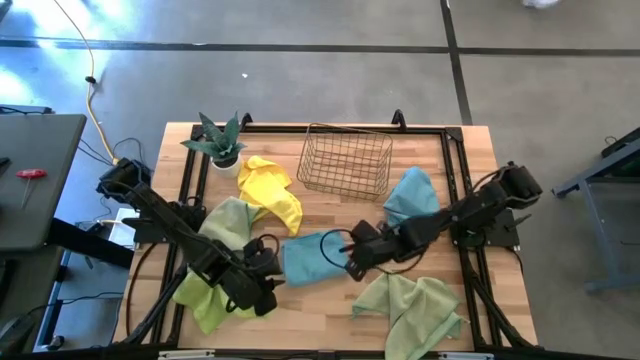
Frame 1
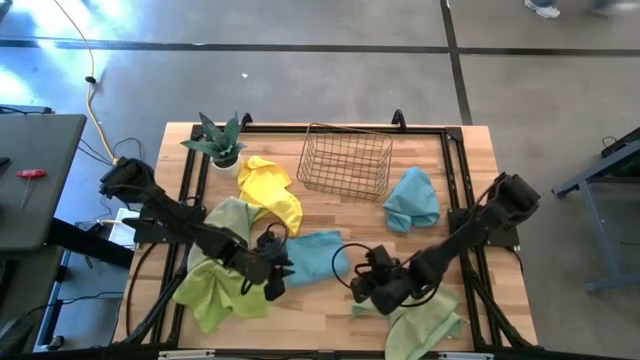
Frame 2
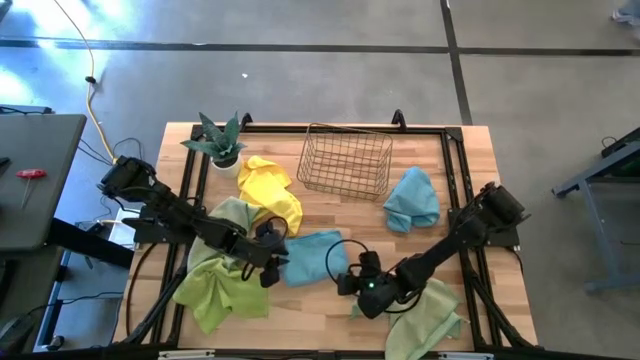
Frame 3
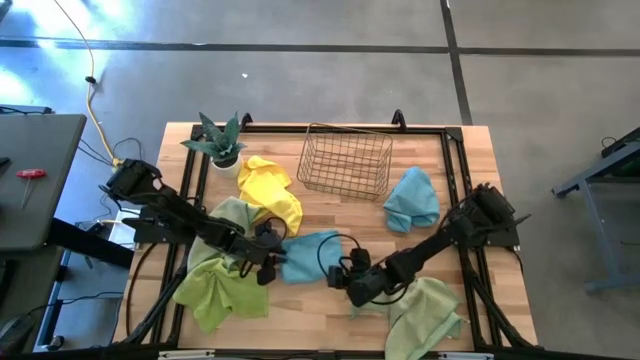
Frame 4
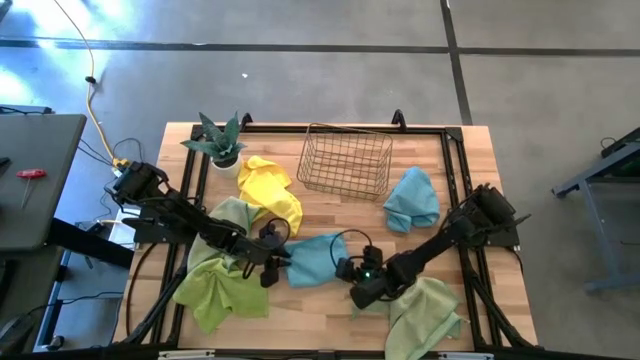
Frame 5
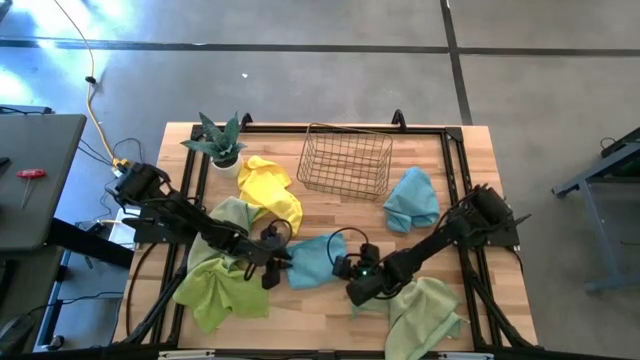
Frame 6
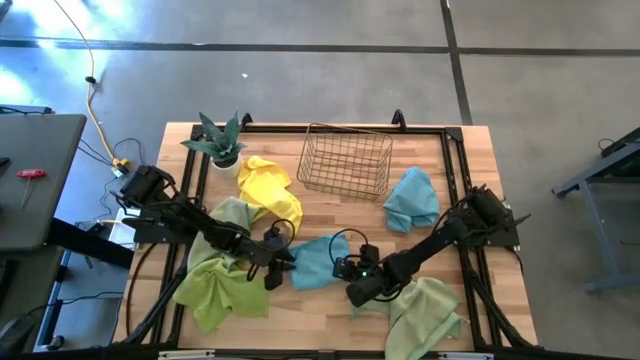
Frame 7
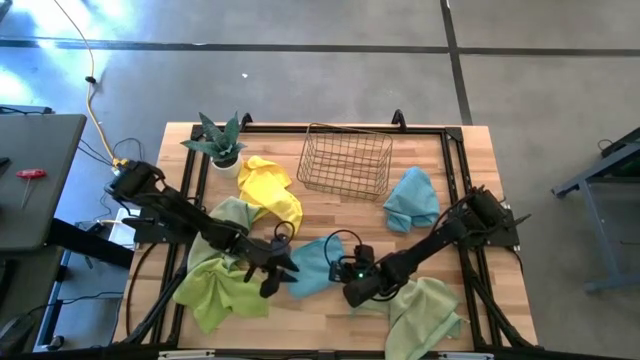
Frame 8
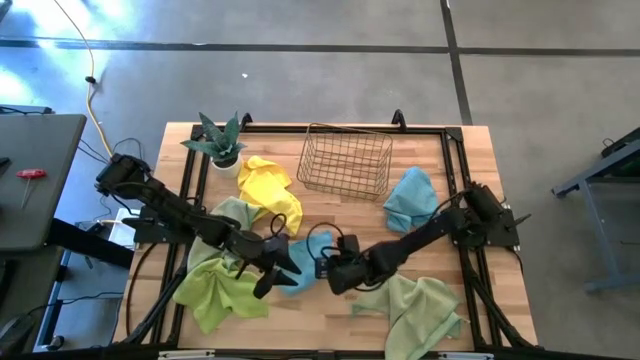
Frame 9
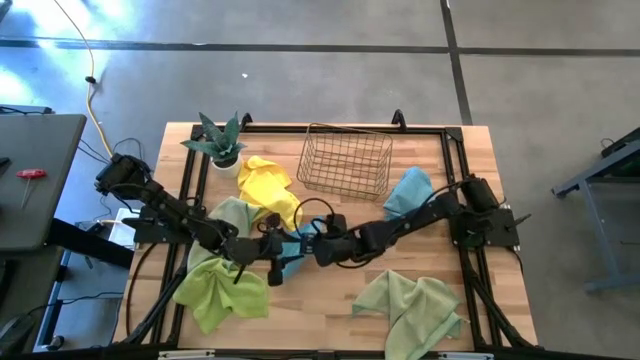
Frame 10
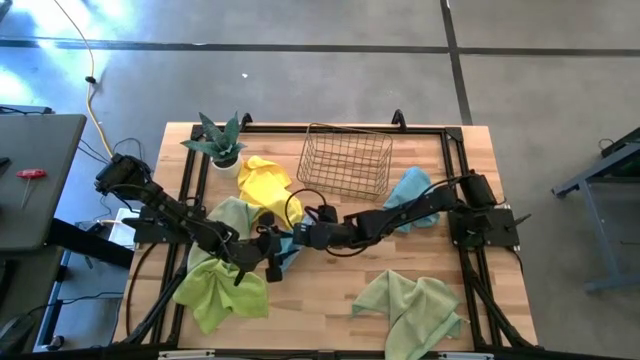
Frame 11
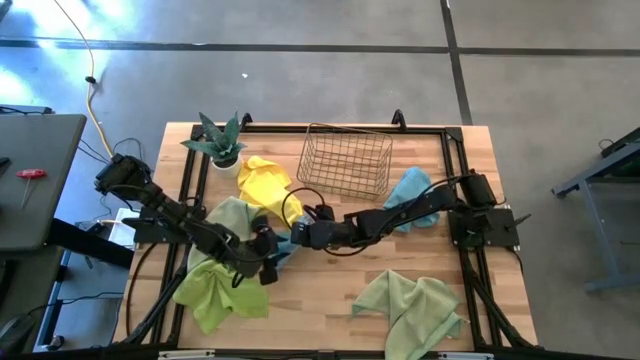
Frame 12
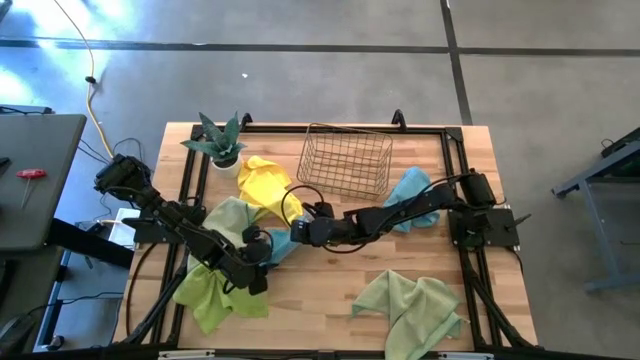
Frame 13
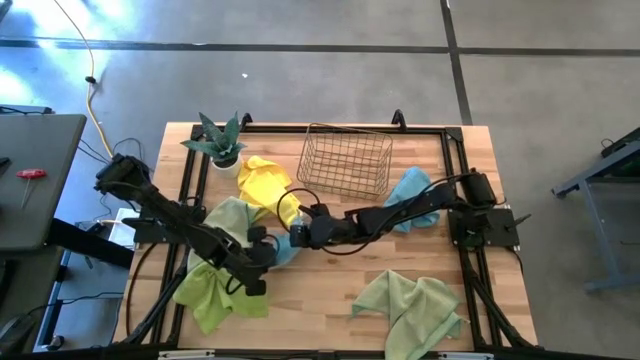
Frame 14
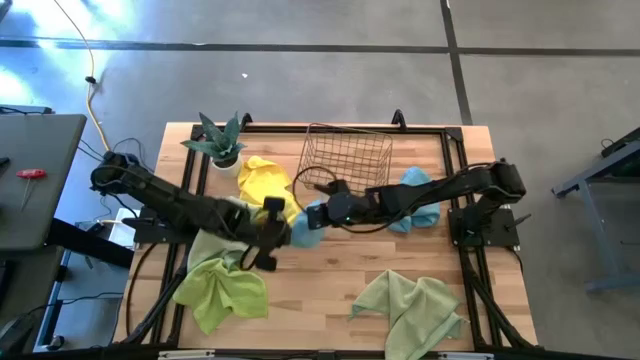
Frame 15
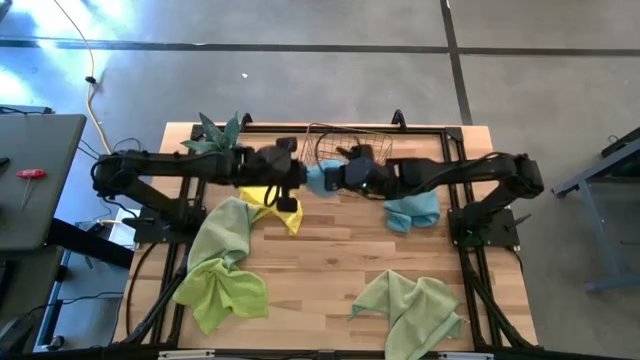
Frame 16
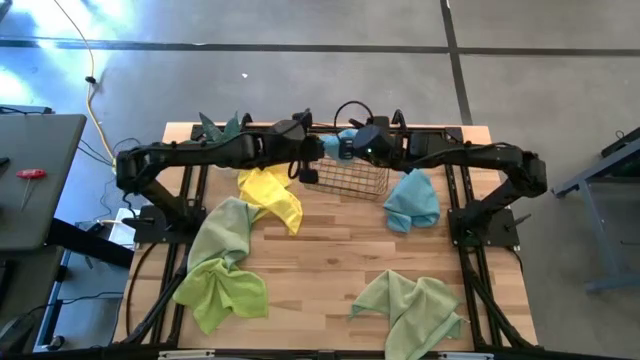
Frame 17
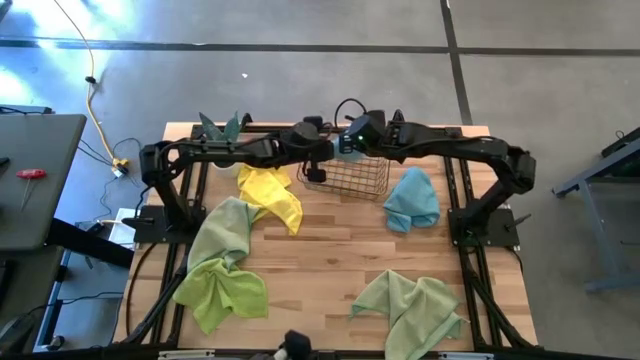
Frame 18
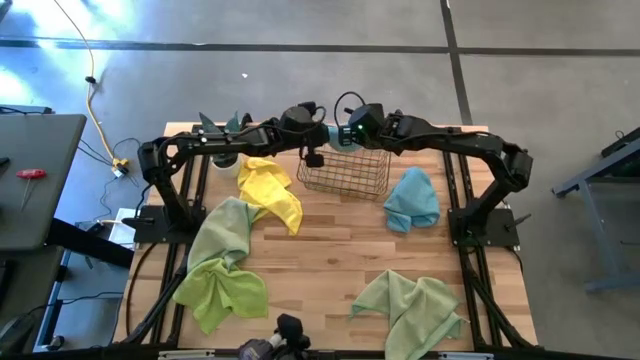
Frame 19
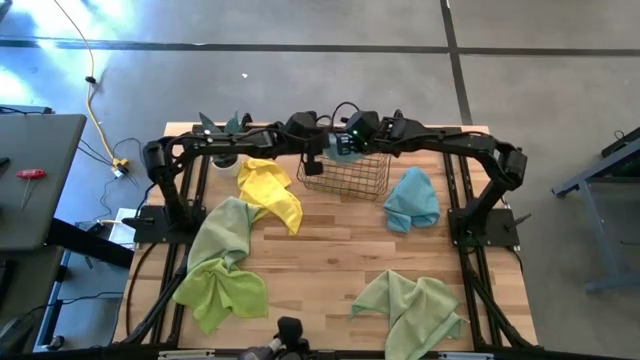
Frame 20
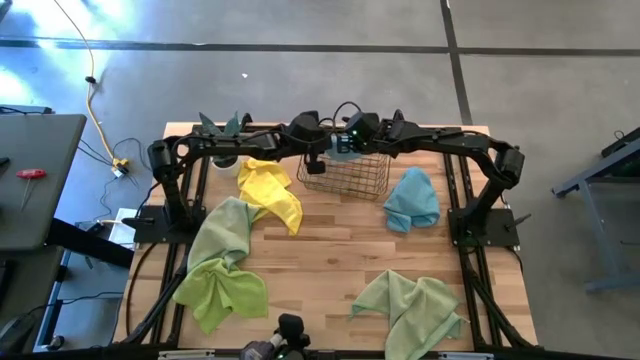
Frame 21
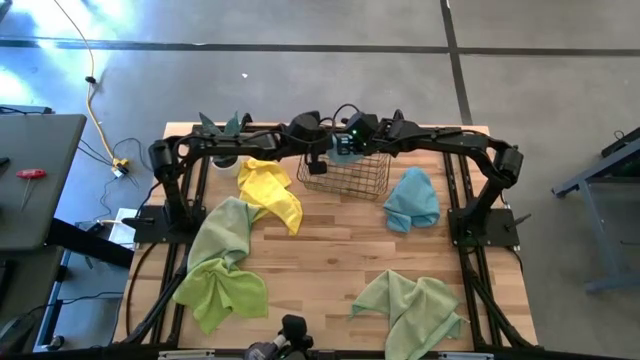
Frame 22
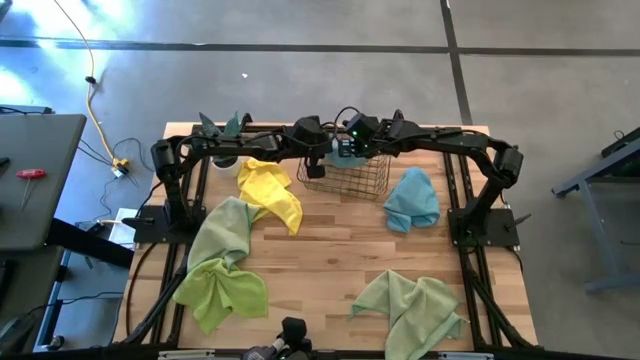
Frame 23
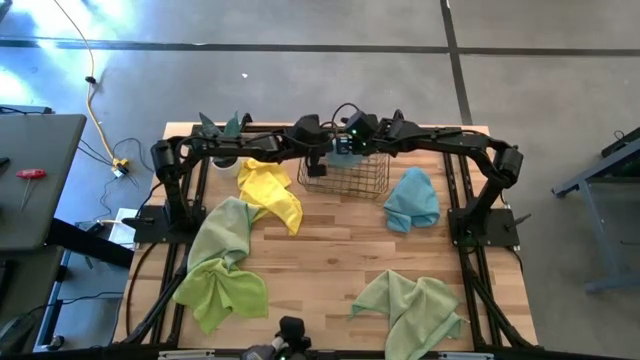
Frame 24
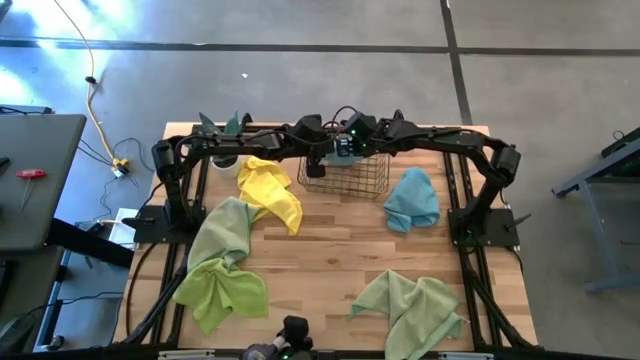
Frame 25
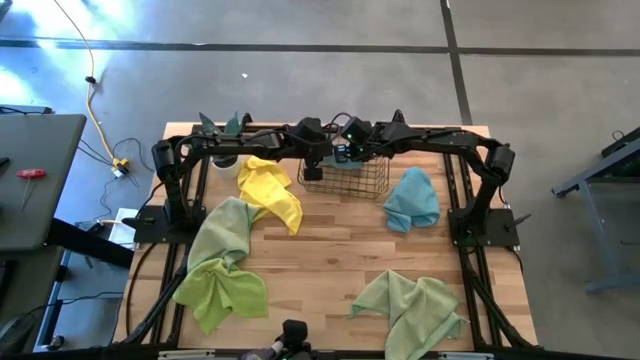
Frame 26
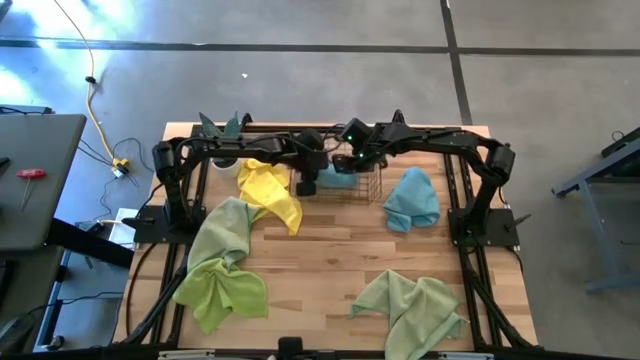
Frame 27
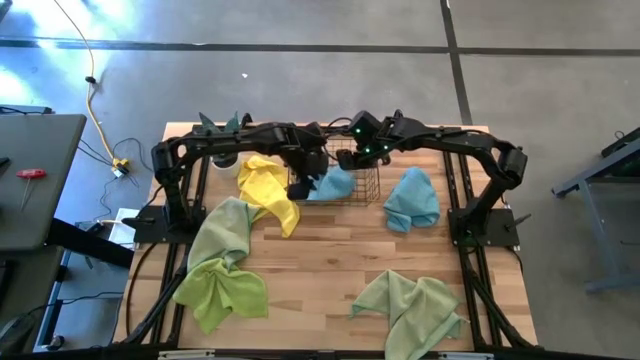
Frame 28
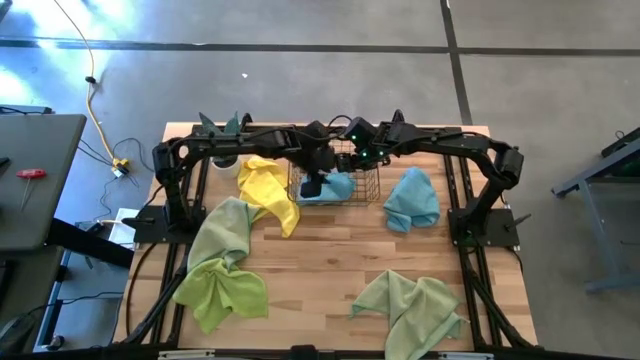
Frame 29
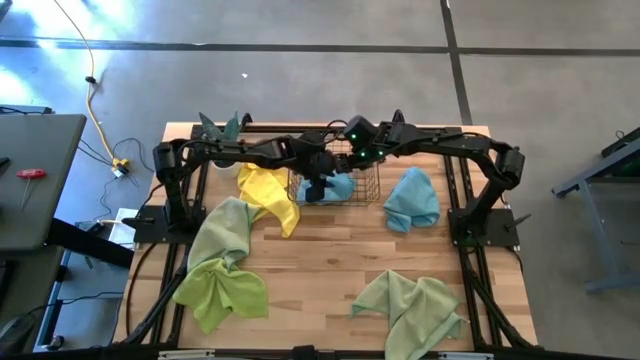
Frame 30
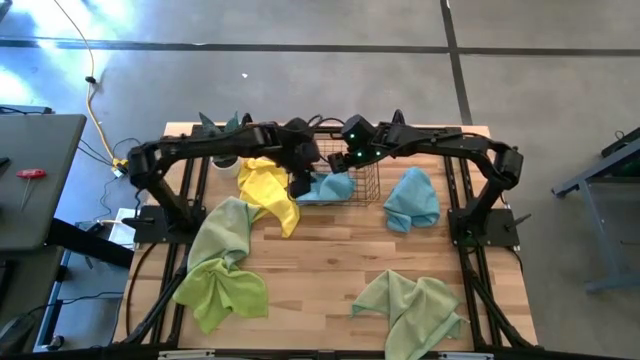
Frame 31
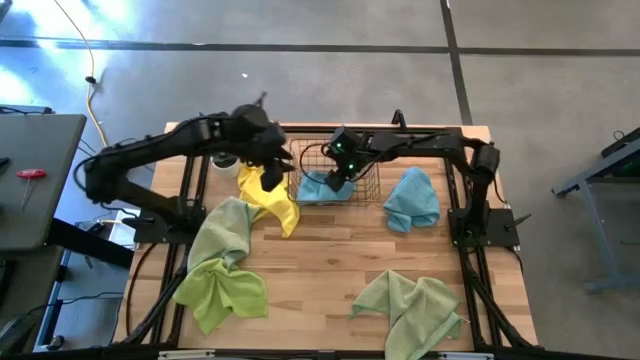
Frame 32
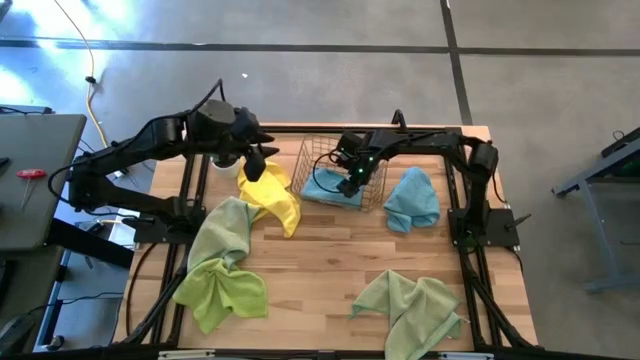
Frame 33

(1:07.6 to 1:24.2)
Task: Fold microfiber towels
Put the bottom blue microfiber cloth in the basket

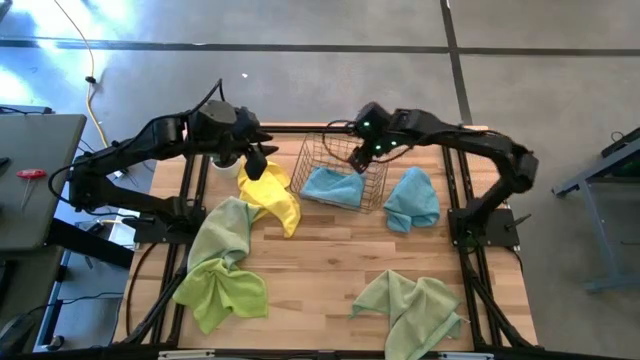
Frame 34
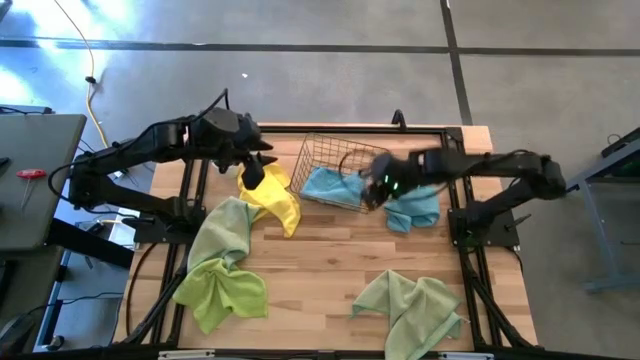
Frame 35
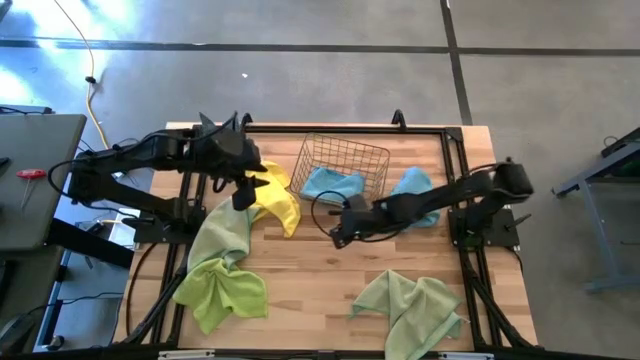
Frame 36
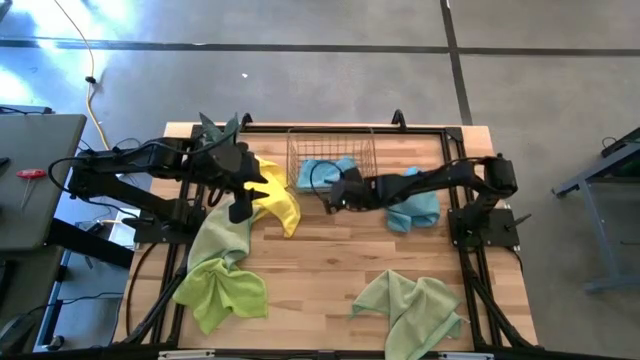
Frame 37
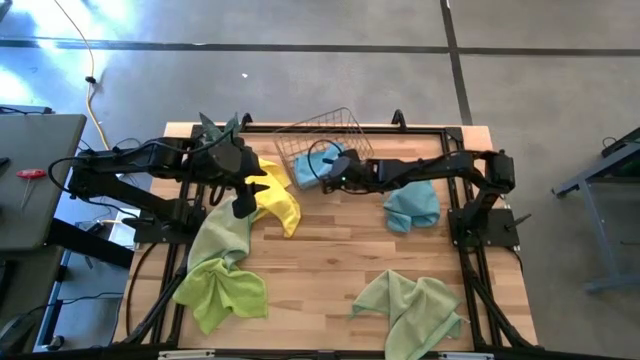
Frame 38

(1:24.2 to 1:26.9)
Adjust the basket

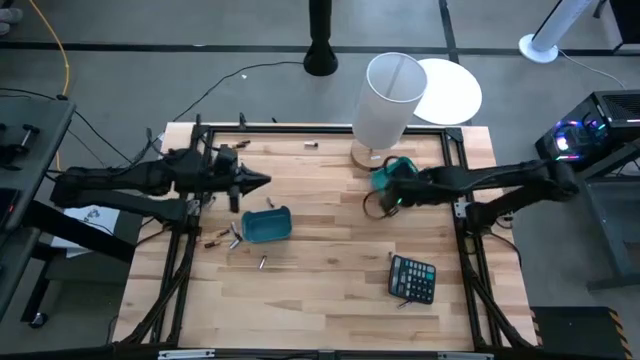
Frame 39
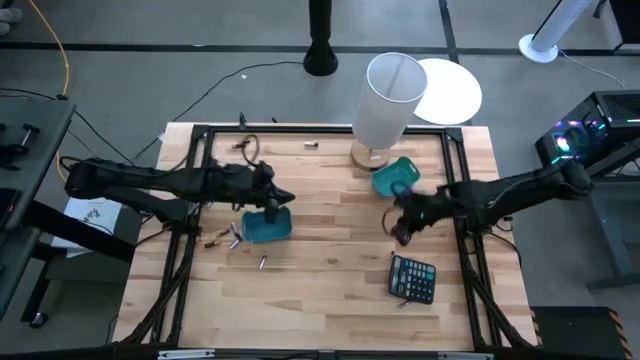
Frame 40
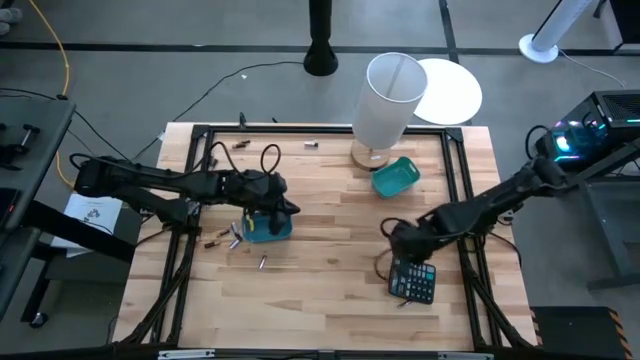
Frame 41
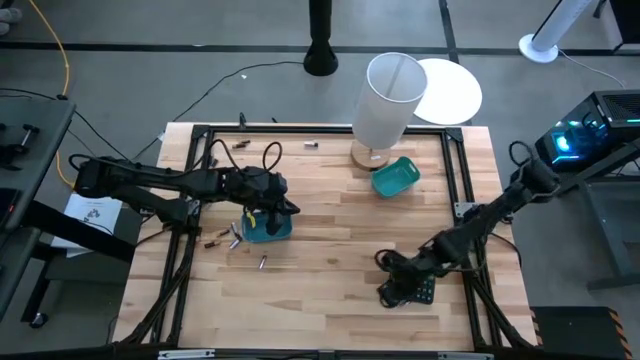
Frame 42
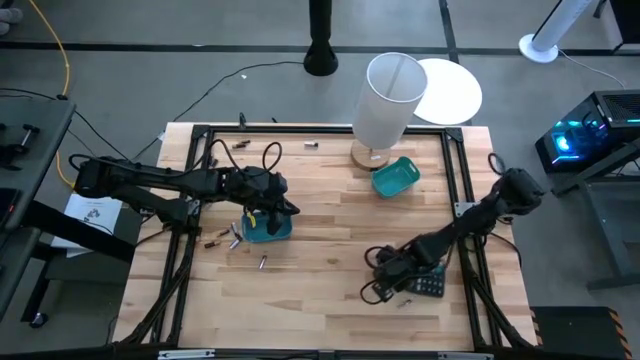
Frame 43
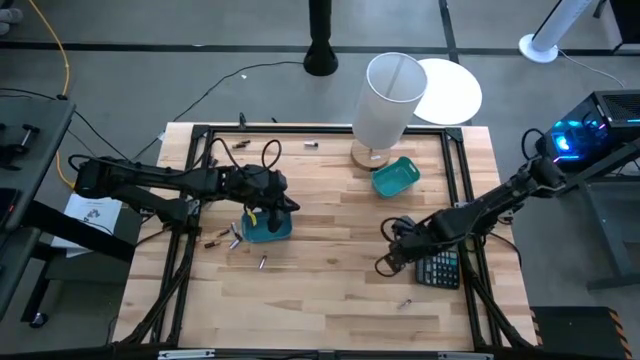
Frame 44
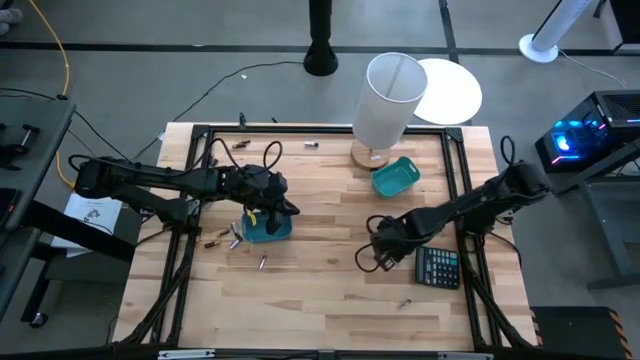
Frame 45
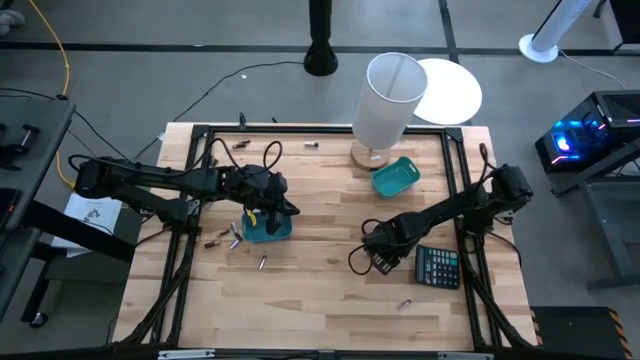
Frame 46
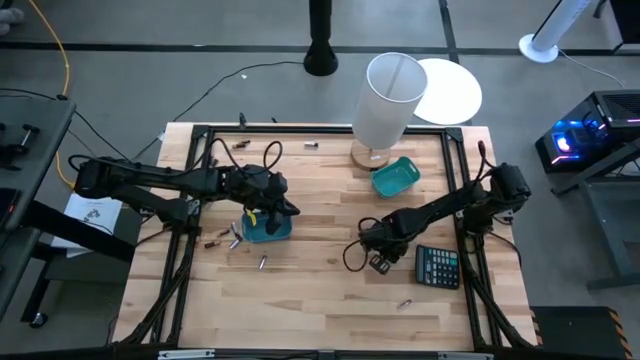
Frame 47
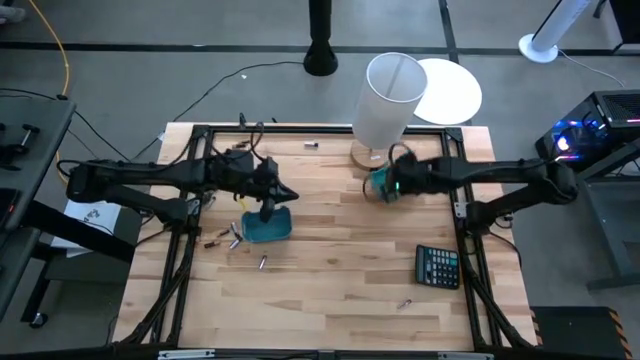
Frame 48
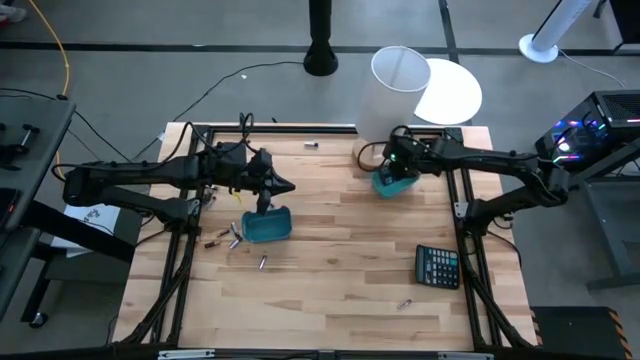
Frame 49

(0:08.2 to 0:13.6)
Task: Sort batteries
Put the silver battery into the green bin
